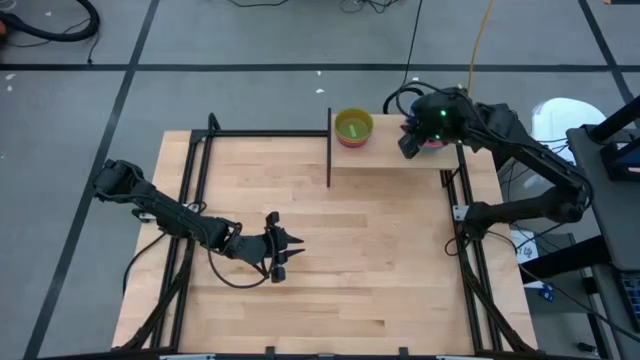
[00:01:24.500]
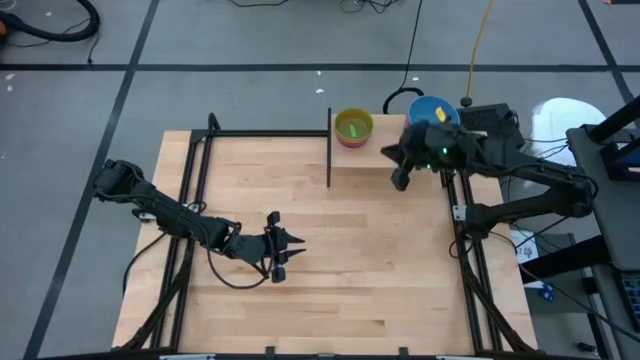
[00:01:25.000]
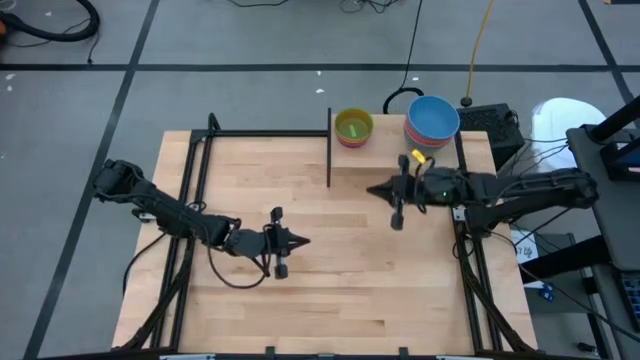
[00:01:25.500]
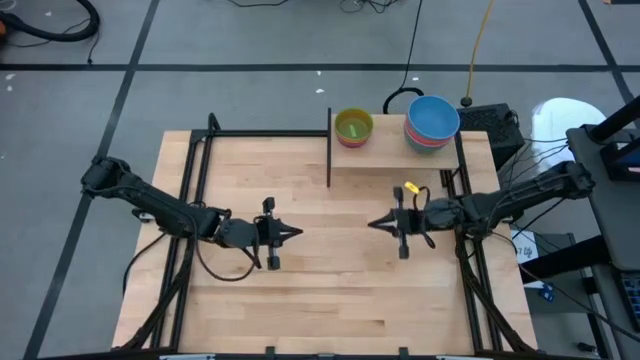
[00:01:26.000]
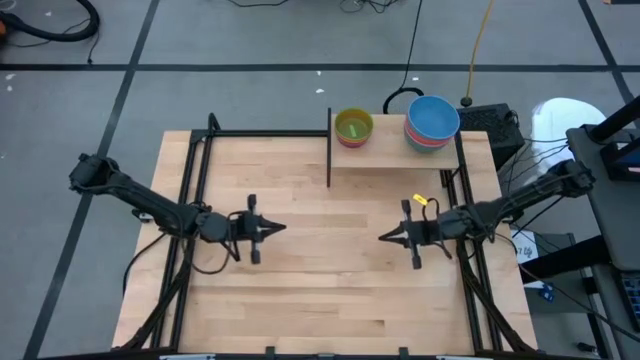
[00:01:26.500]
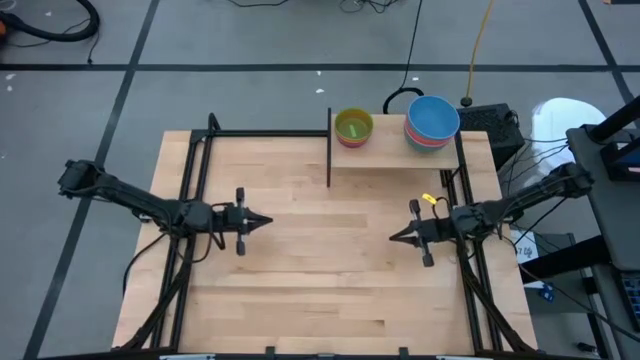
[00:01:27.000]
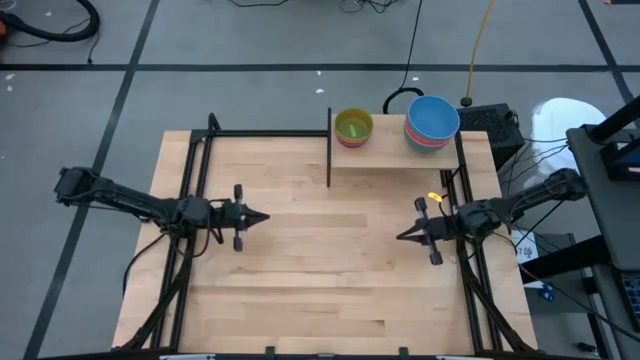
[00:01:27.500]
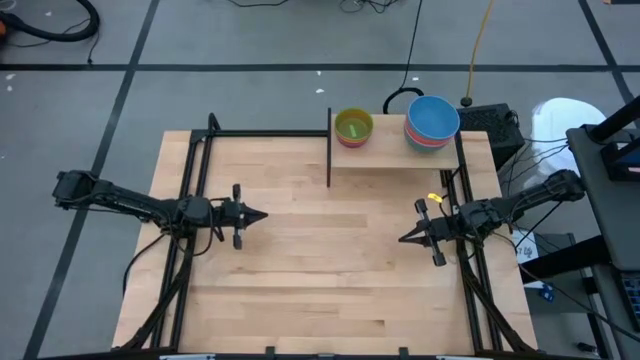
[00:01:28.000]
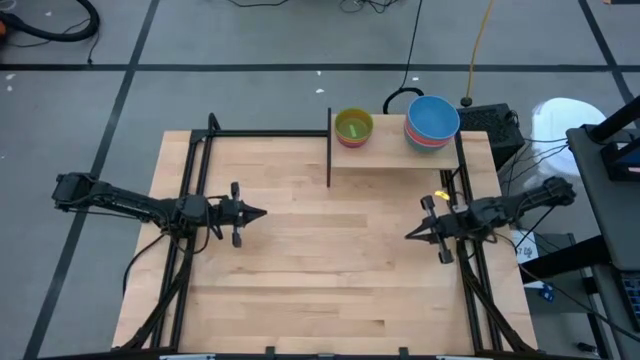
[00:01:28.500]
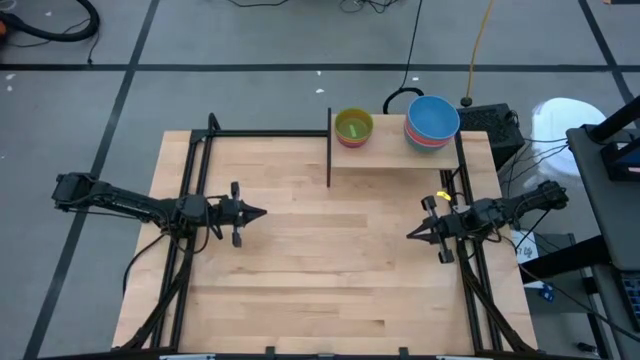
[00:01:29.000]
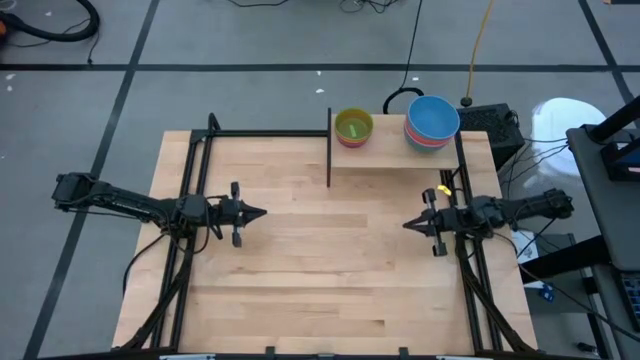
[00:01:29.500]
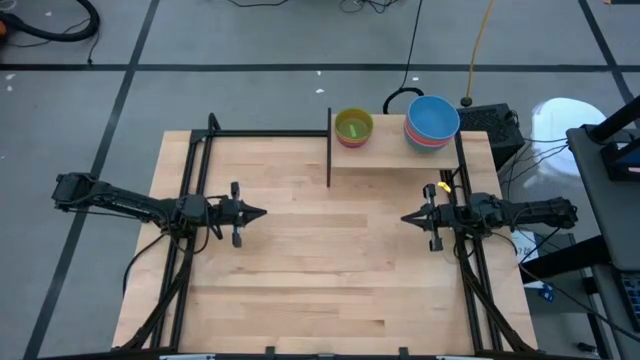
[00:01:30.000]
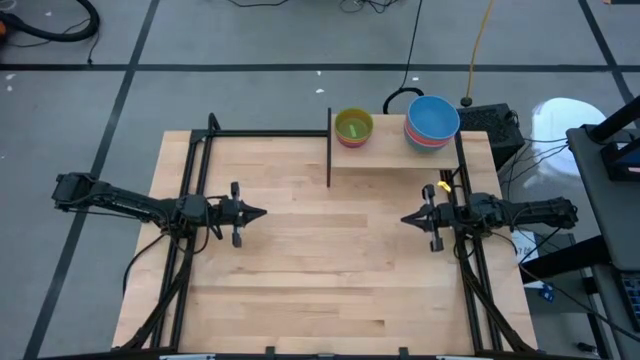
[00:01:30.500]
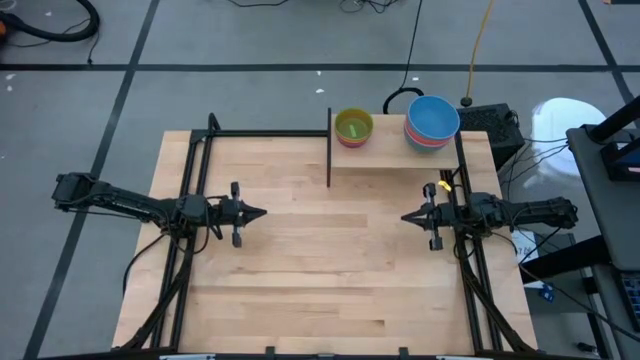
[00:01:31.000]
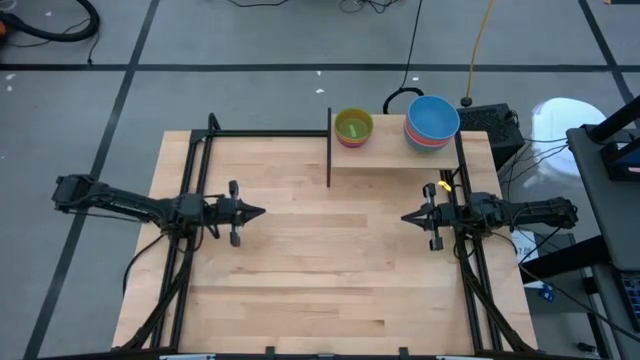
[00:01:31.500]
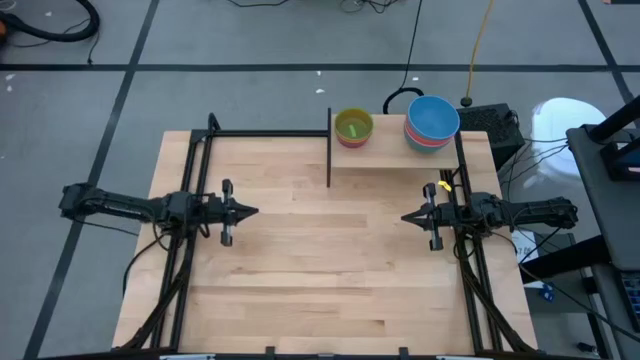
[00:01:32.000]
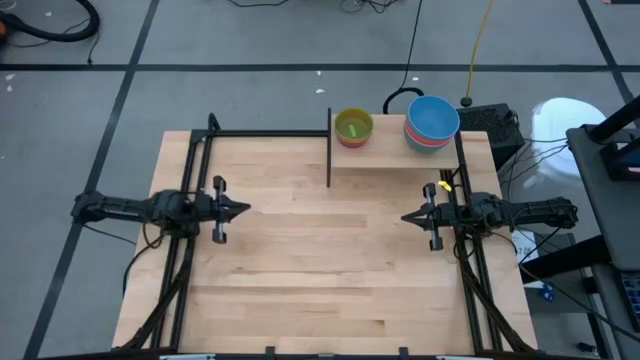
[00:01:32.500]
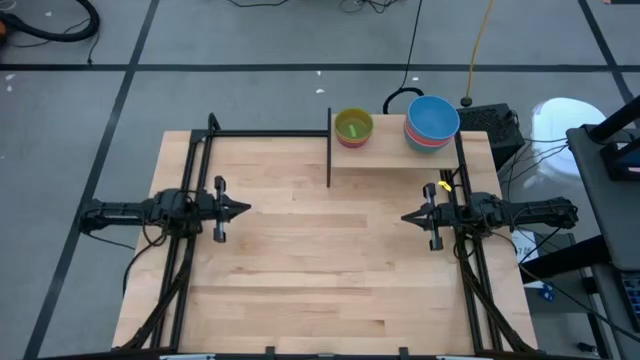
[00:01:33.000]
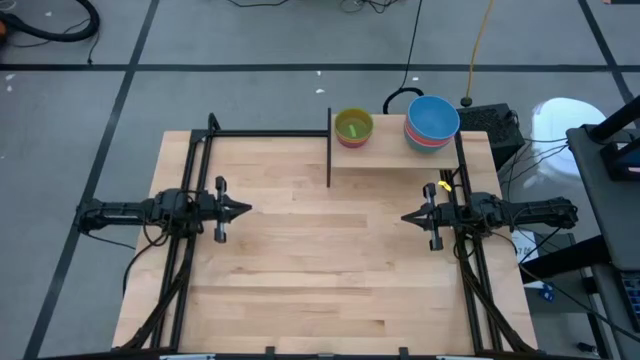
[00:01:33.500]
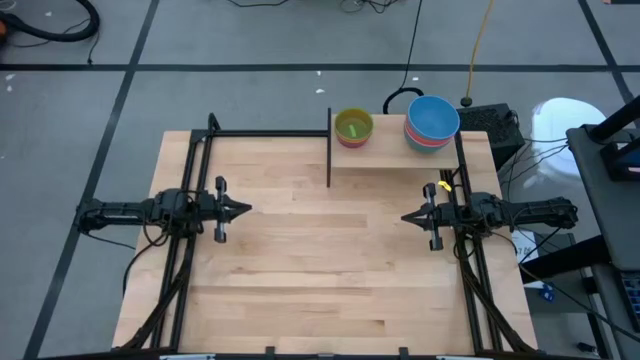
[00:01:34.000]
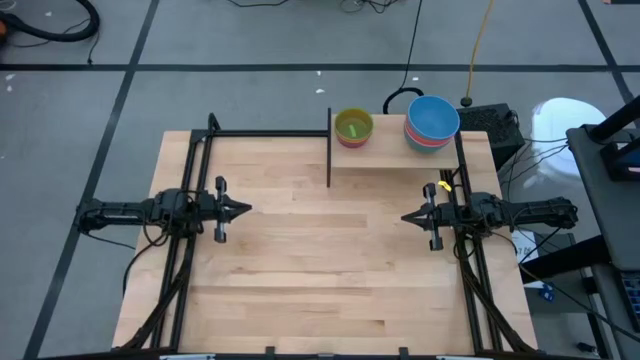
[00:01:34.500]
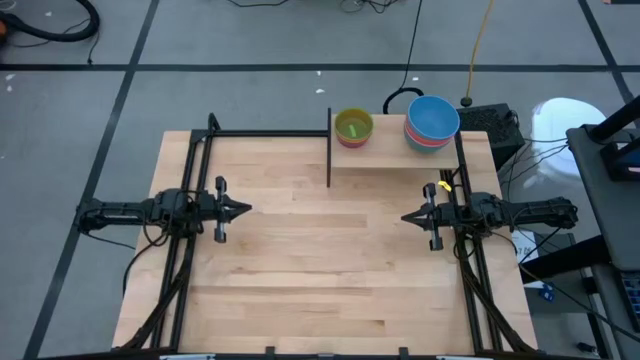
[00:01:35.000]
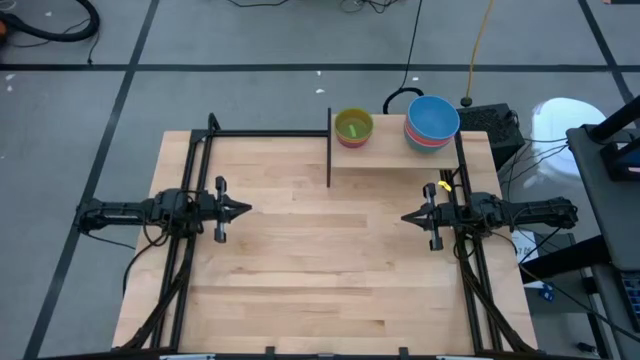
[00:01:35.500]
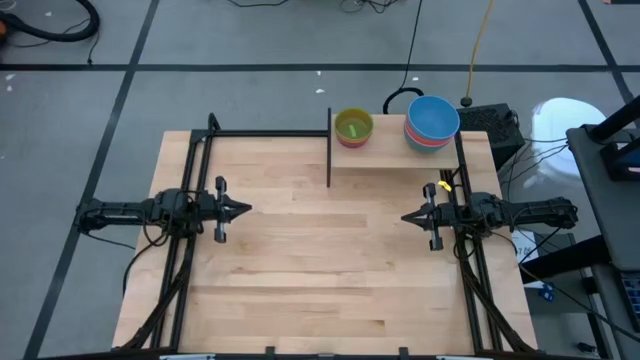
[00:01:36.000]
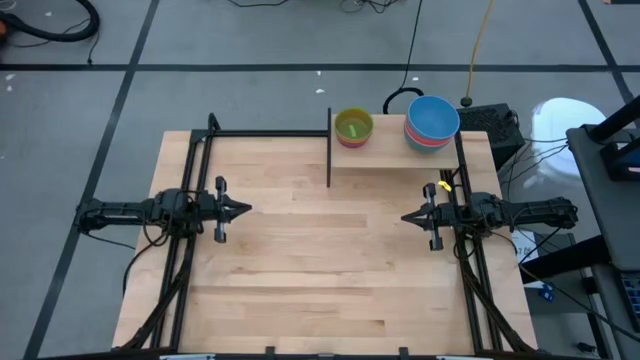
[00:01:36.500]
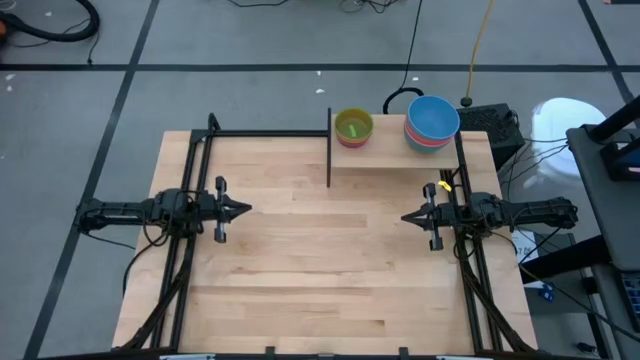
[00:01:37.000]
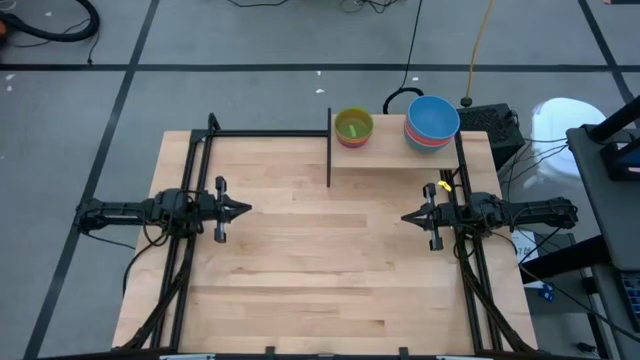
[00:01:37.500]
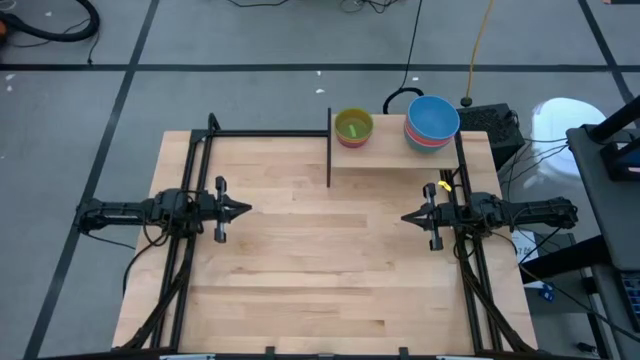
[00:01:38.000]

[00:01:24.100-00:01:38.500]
Task: Place and stack bowls onto a shelf
Return to Home Position
